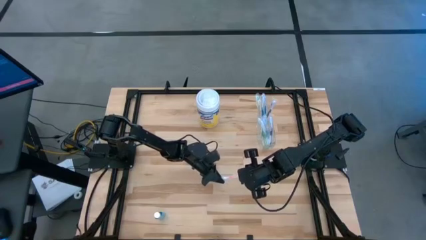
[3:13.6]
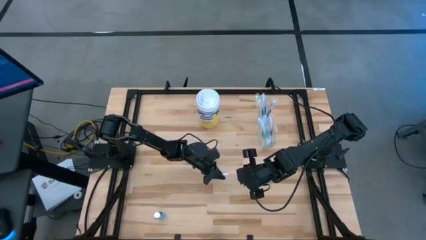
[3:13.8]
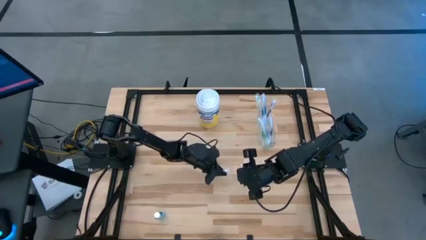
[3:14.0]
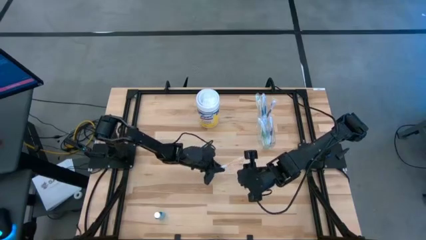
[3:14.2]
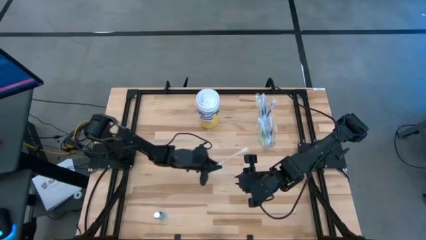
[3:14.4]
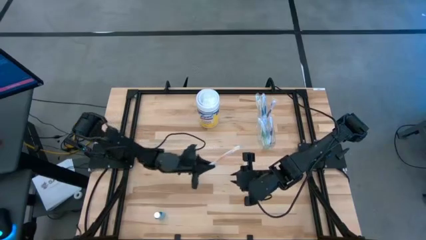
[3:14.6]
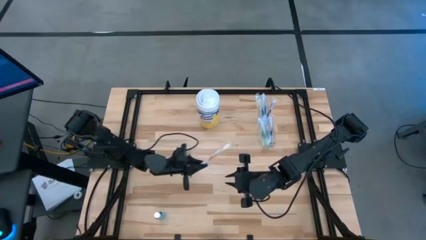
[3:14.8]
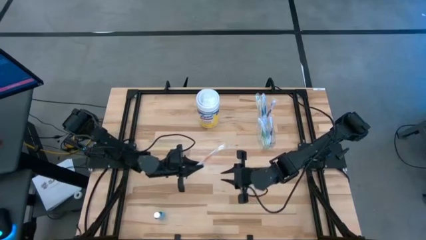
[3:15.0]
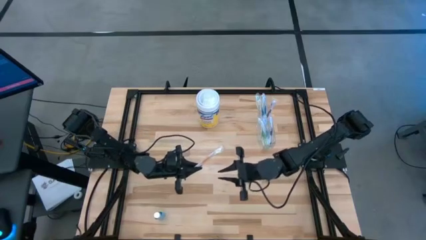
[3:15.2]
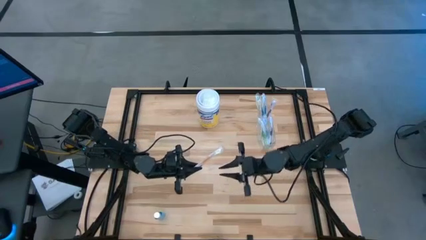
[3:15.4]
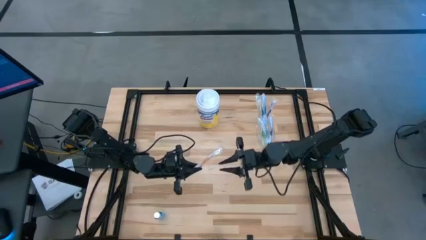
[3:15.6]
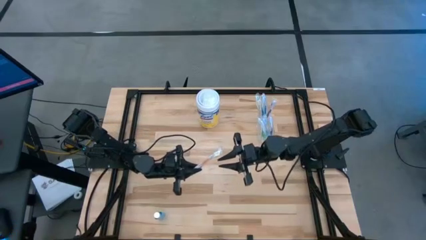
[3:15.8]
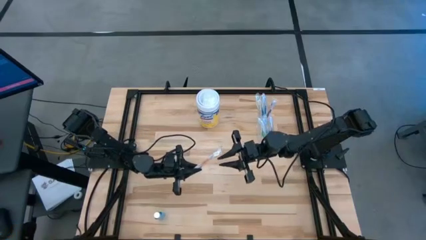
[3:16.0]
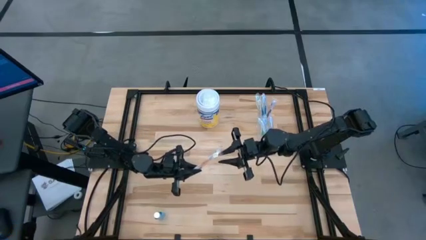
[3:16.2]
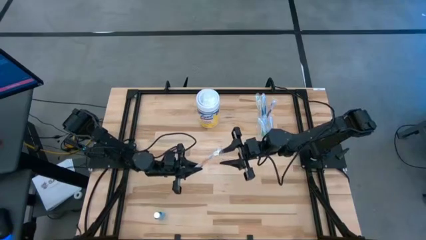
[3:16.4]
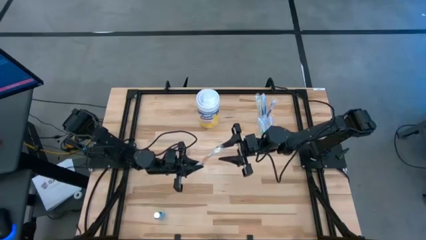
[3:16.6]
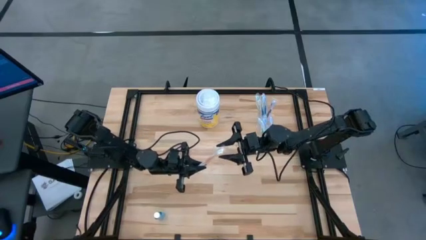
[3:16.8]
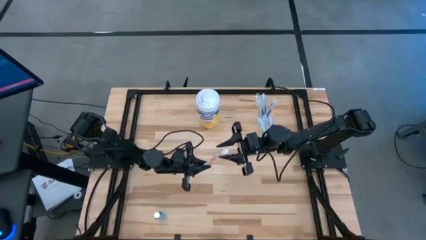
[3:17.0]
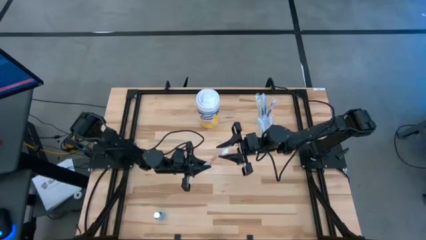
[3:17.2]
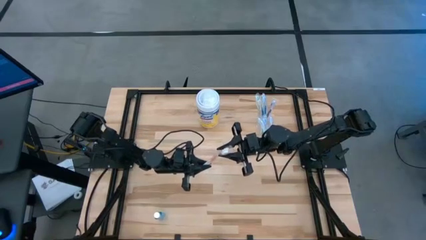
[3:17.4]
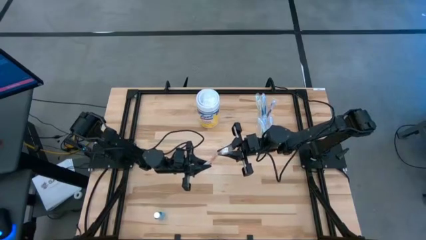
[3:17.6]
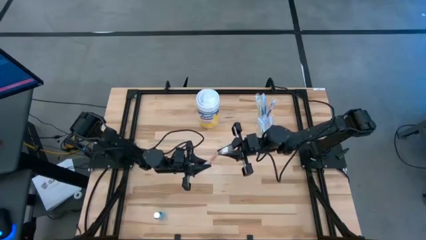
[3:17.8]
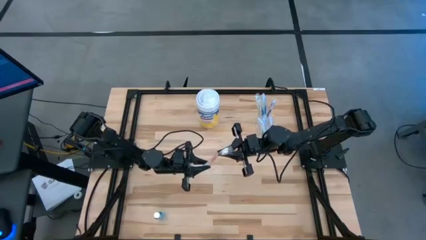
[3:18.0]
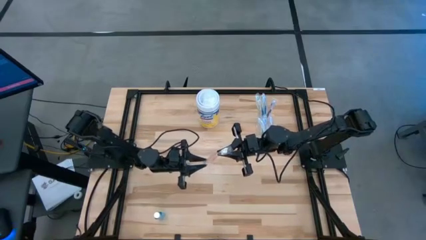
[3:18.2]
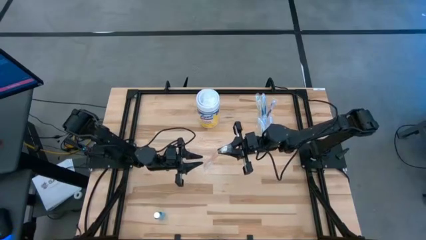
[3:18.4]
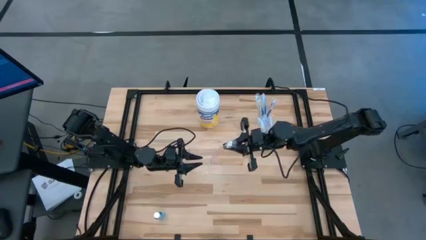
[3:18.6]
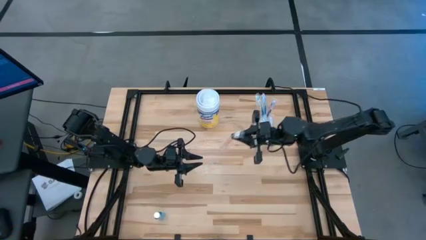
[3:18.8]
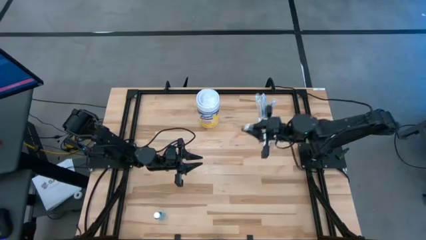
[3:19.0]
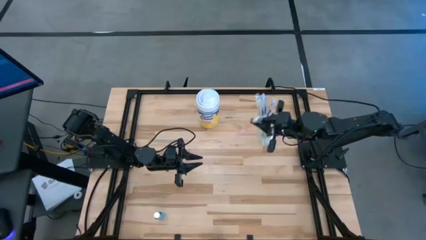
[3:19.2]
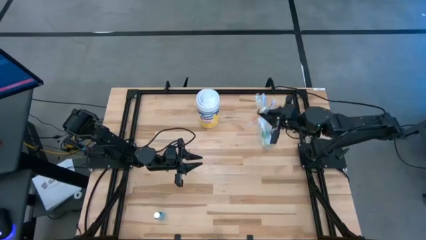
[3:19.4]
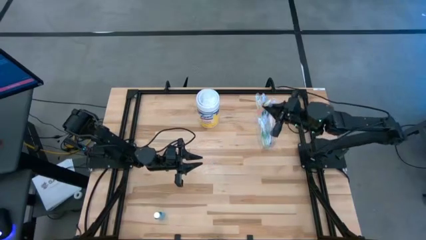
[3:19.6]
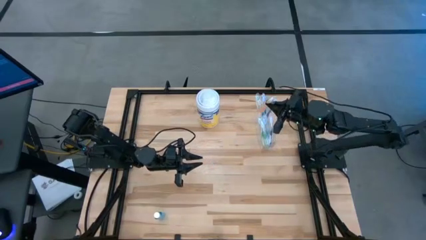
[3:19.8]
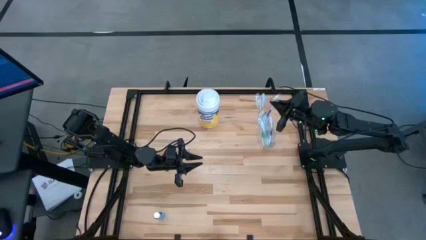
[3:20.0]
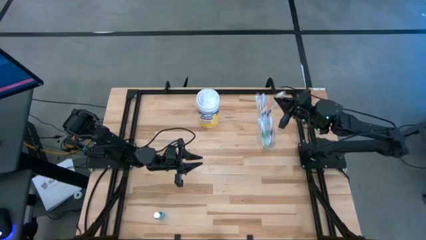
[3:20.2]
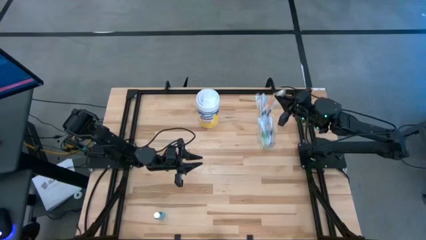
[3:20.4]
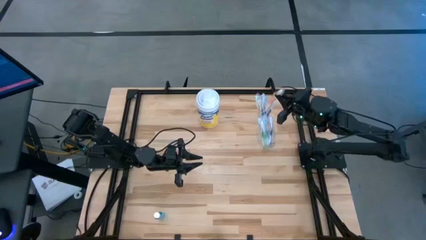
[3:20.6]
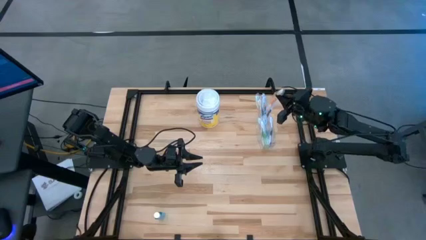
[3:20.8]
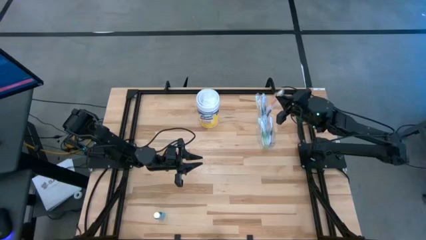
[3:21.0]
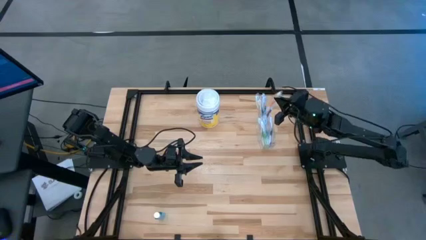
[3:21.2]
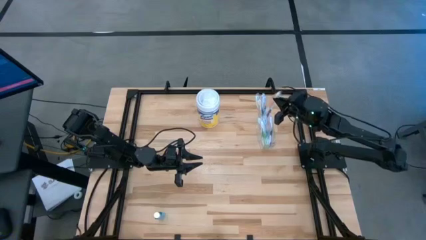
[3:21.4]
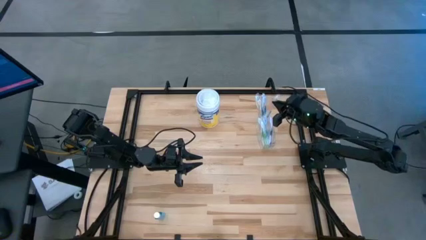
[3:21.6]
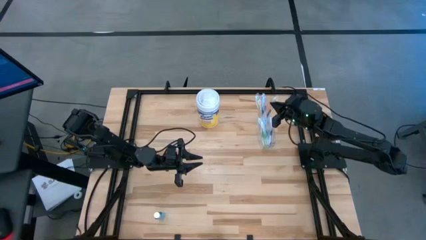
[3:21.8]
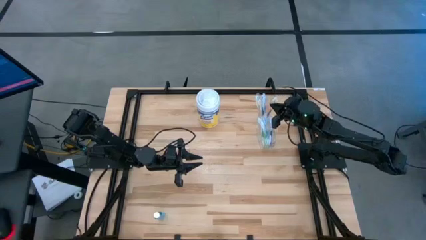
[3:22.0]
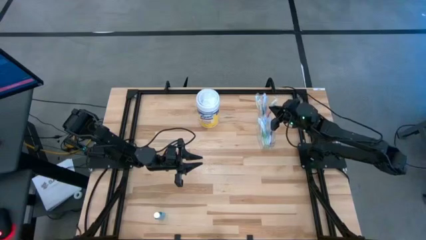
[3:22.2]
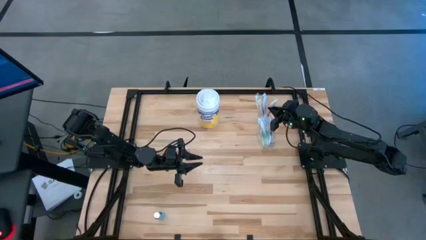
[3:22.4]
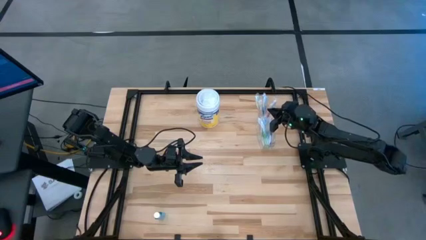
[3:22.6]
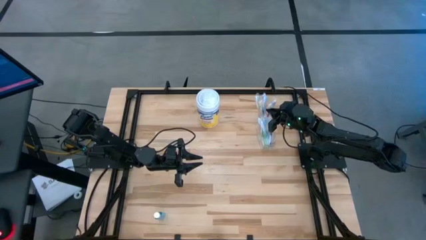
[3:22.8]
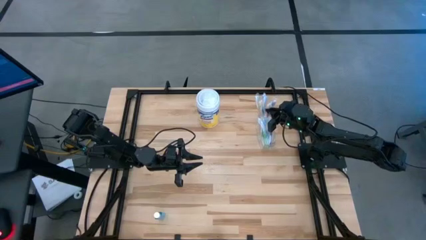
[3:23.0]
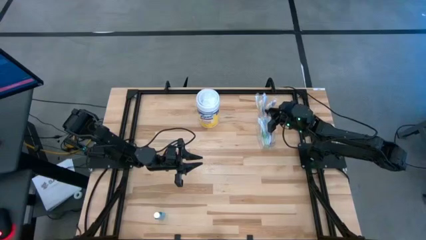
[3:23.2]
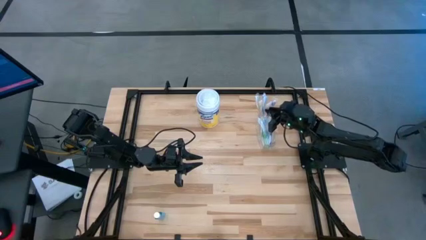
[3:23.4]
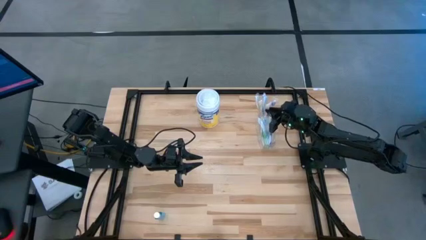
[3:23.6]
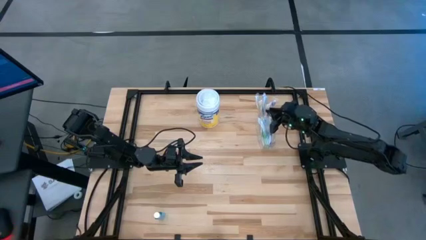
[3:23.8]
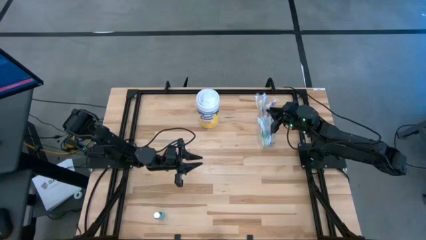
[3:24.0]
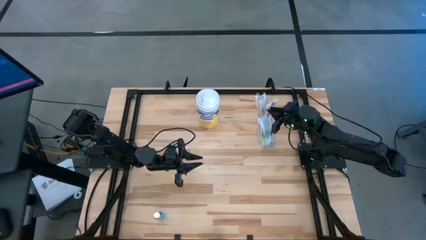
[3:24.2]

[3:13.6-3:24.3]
Task: Pick & Place toothbrushing station
Put the orange toothbrush into the transparent organizer

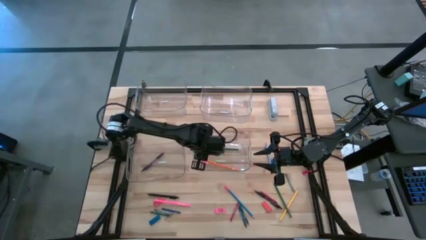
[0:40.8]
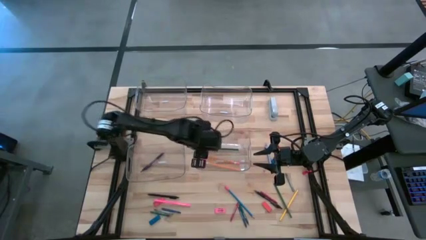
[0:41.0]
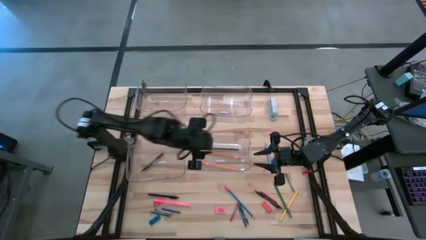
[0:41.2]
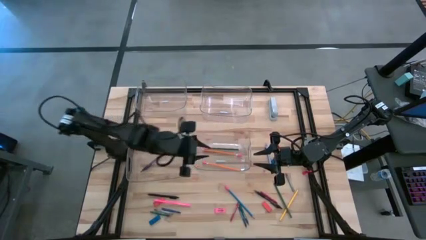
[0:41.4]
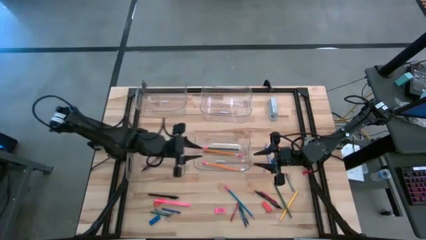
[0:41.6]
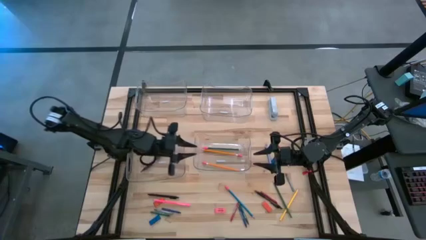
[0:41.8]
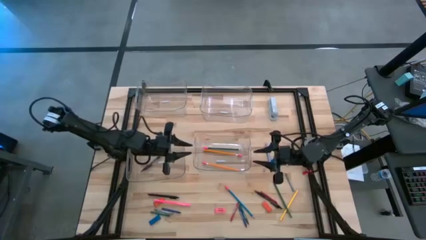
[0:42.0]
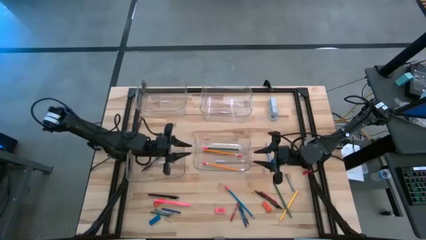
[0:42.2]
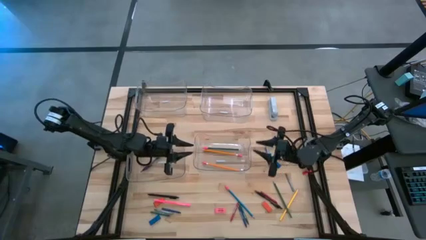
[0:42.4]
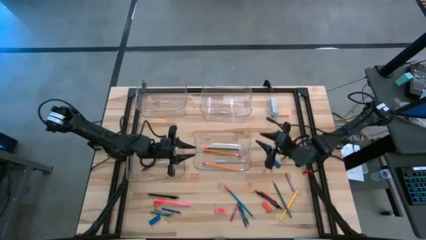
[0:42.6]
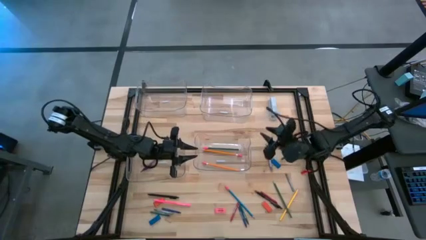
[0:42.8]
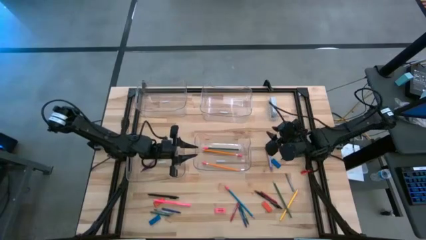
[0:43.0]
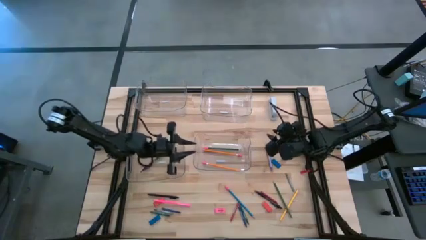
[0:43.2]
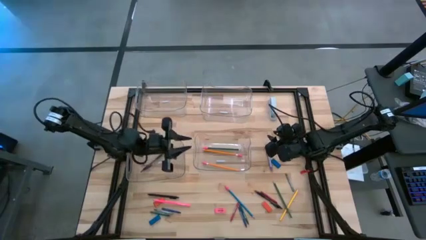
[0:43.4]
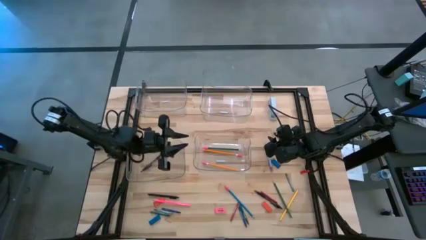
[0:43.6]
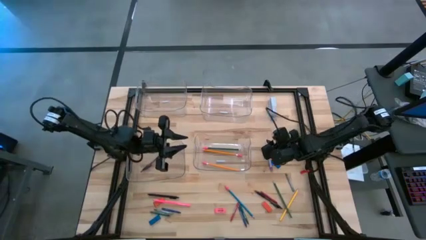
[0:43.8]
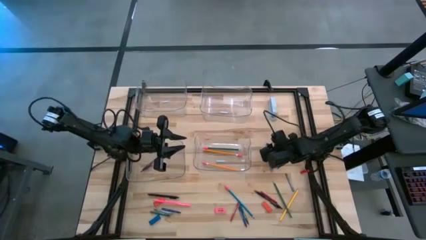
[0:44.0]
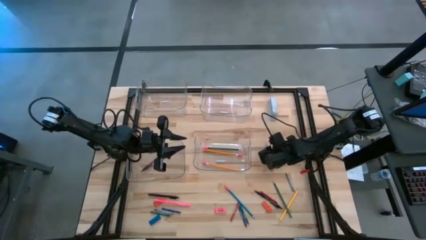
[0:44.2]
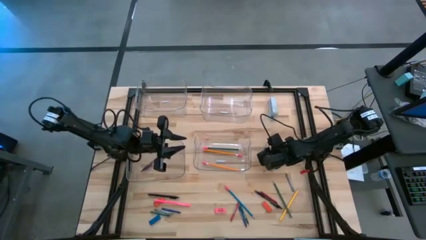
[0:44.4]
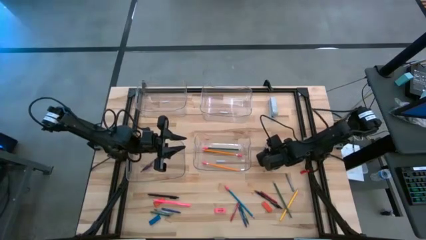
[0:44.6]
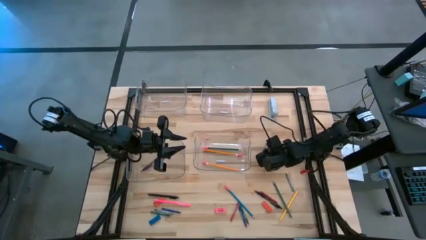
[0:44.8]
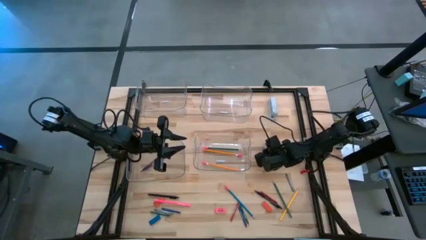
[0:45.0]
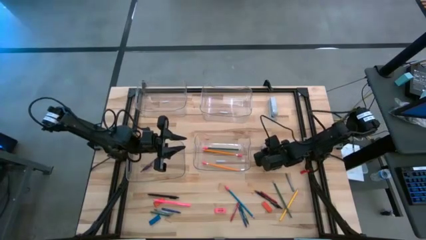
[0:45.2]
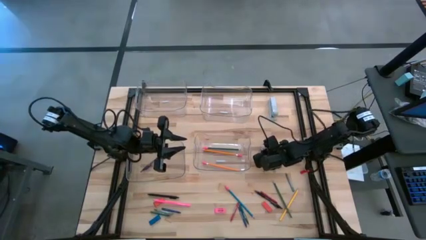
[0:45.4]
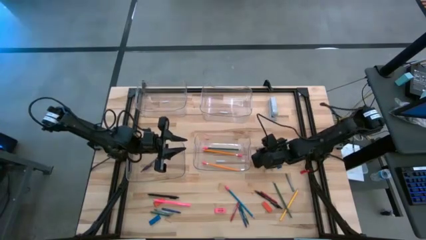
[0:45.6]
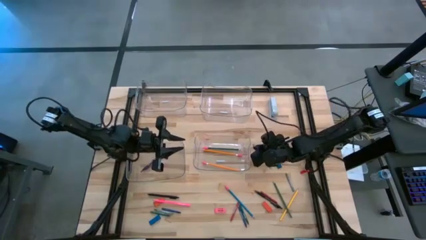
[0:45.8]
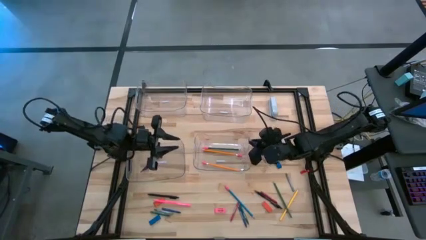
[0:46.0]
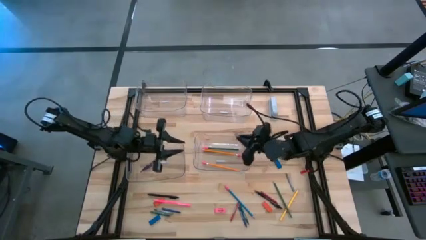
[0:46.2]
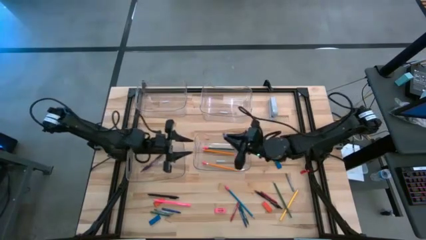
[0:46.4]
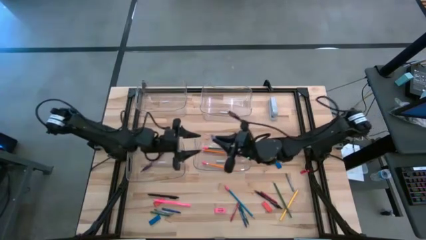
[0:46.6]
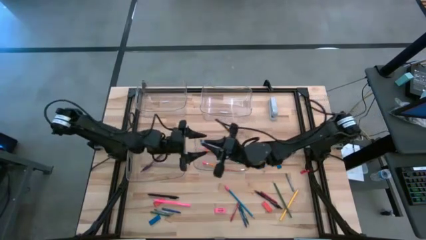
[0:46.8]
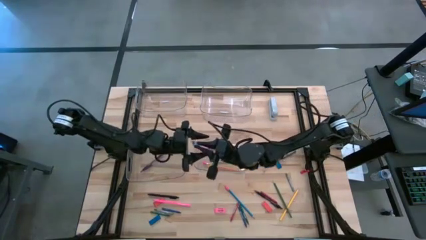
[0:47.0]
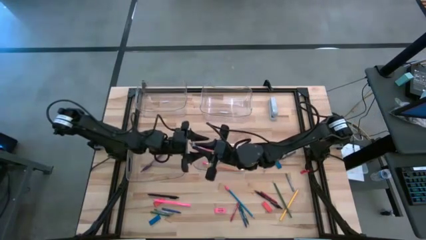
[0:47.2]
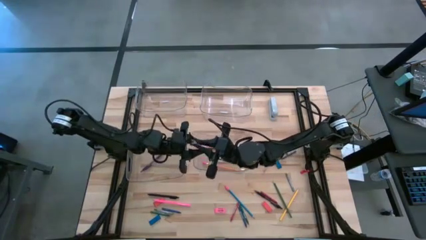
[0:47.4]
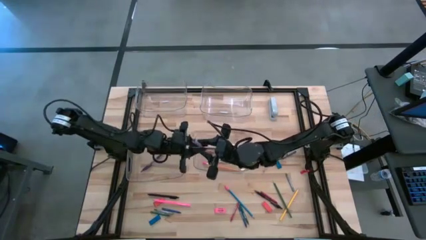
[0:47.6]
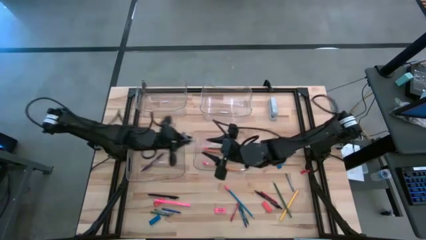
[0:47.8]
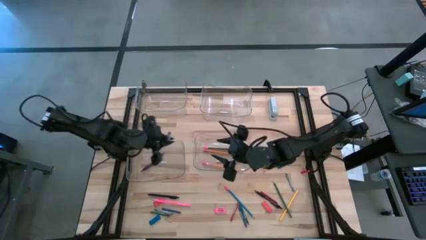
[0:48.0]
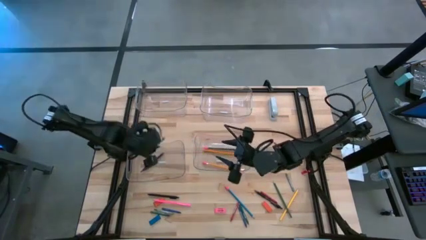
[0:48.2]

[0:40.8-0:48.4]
Task: Sort crayons/erasers/pens/pencils in bins
Put the purple pen into the bottom left transparent bin
